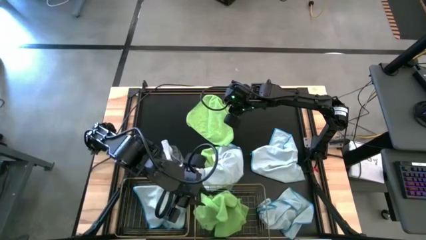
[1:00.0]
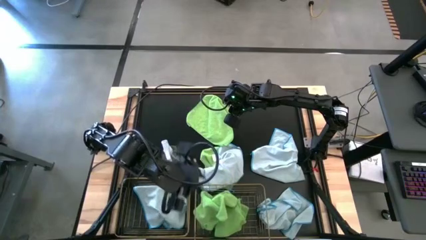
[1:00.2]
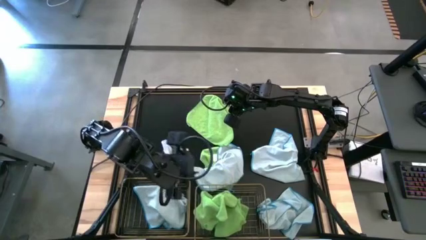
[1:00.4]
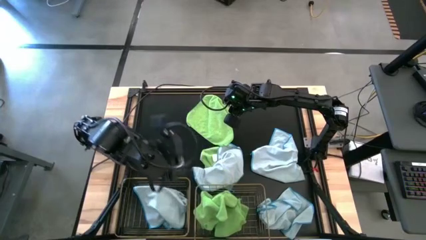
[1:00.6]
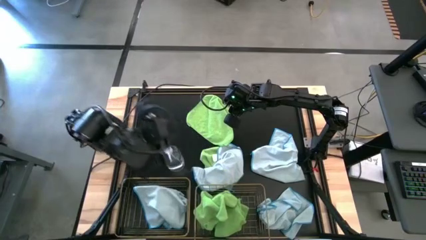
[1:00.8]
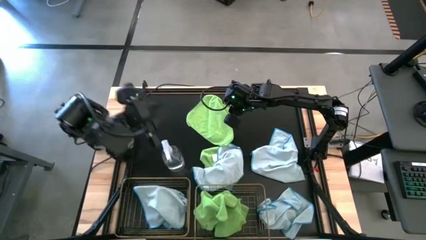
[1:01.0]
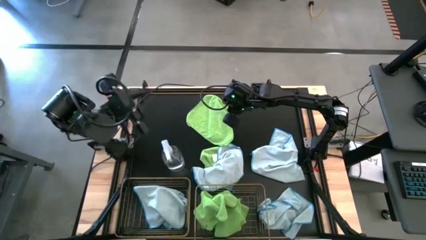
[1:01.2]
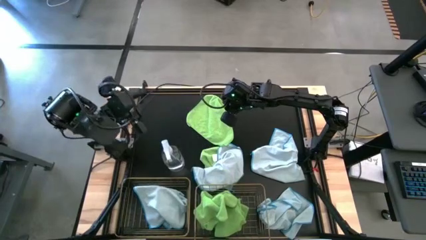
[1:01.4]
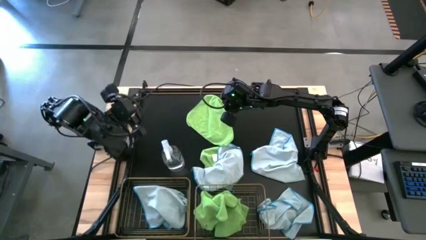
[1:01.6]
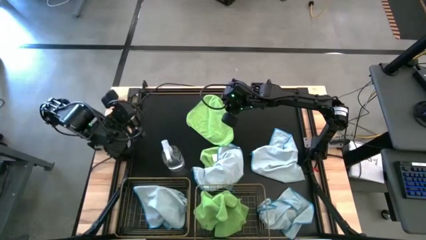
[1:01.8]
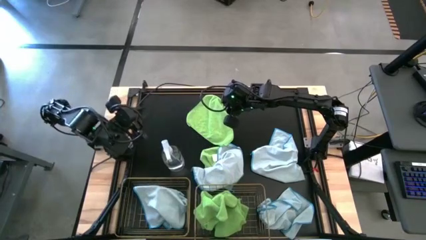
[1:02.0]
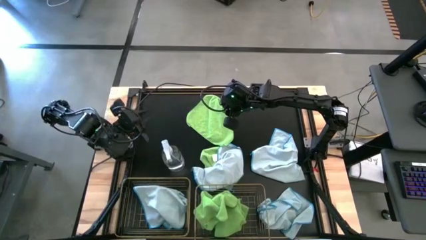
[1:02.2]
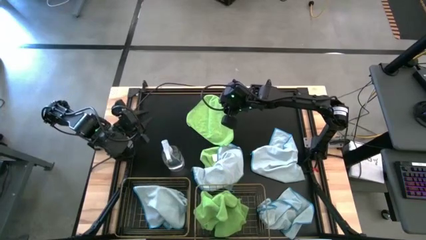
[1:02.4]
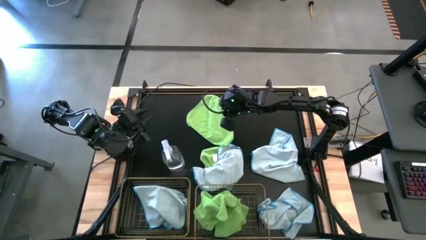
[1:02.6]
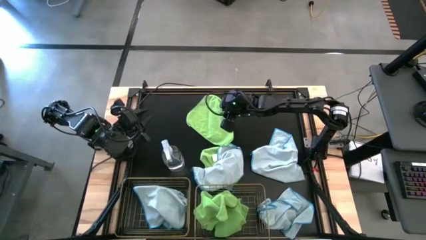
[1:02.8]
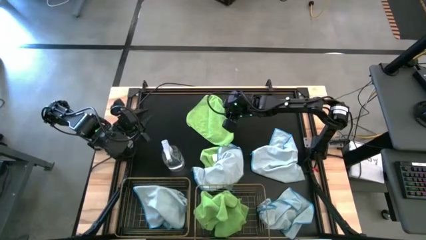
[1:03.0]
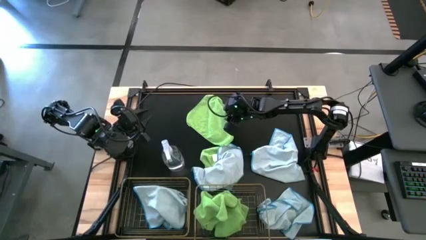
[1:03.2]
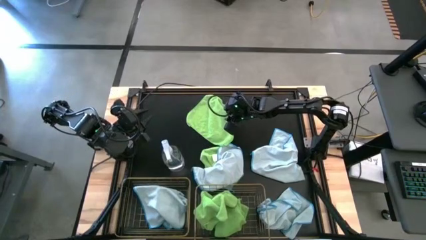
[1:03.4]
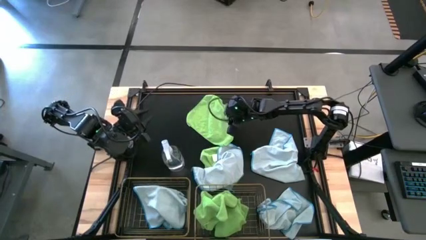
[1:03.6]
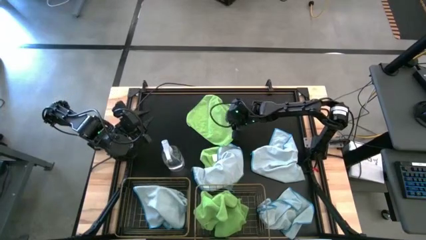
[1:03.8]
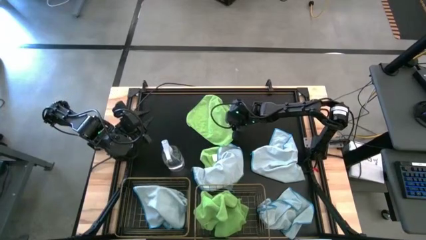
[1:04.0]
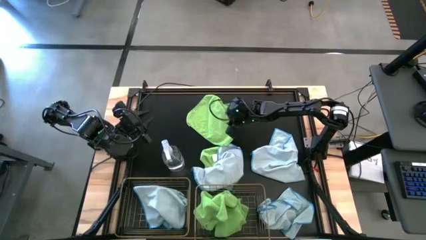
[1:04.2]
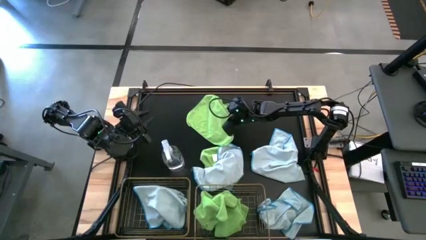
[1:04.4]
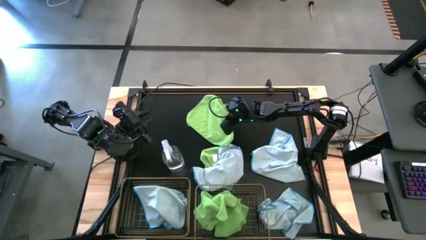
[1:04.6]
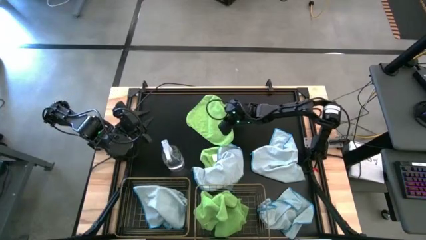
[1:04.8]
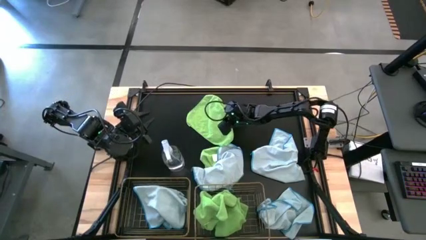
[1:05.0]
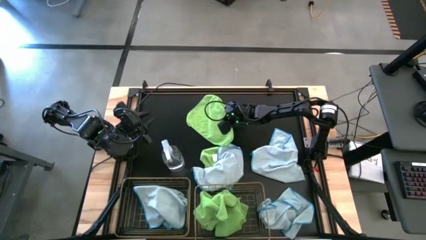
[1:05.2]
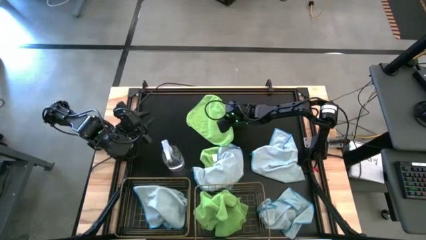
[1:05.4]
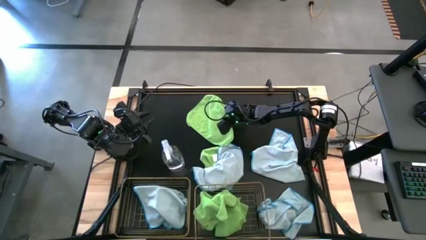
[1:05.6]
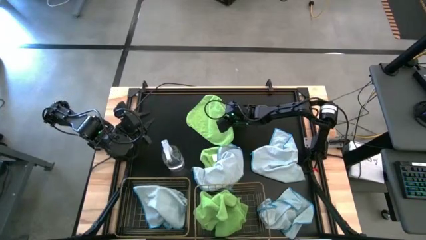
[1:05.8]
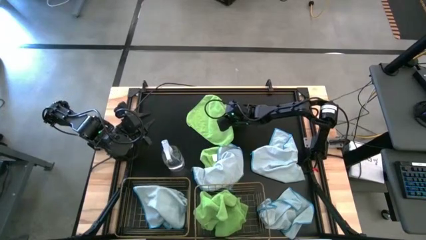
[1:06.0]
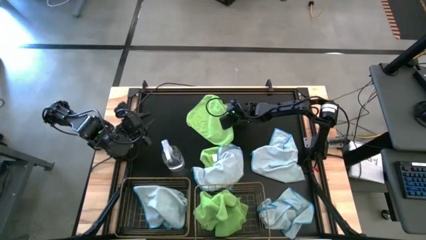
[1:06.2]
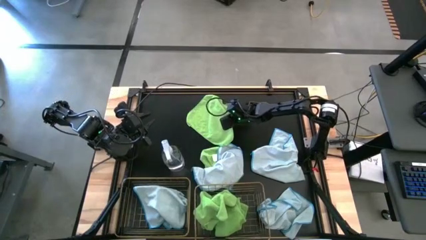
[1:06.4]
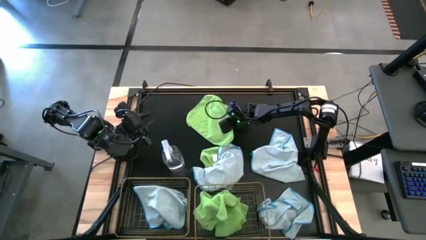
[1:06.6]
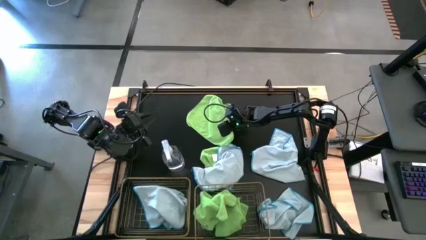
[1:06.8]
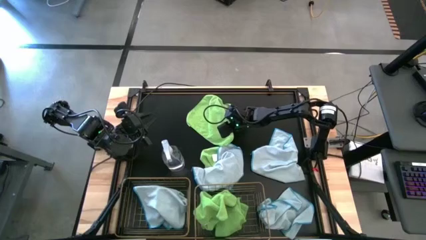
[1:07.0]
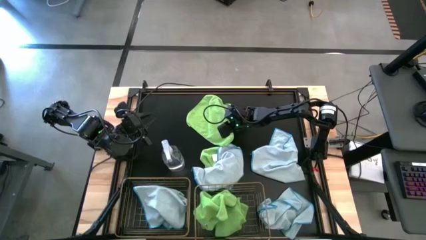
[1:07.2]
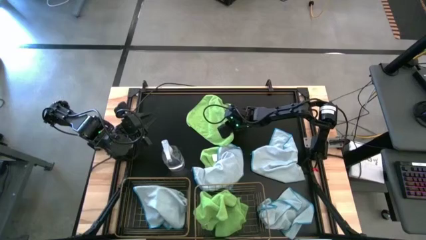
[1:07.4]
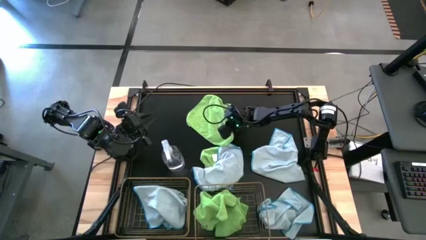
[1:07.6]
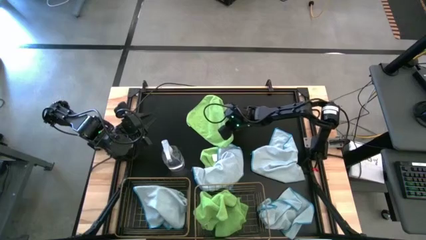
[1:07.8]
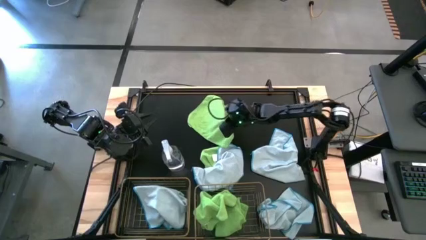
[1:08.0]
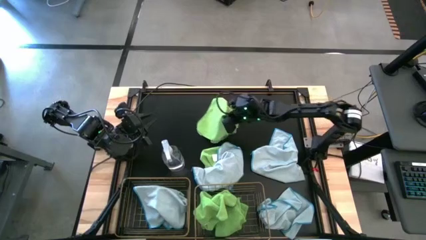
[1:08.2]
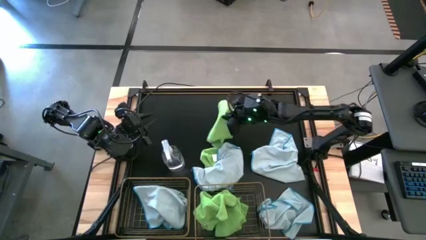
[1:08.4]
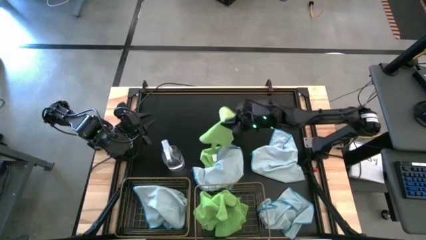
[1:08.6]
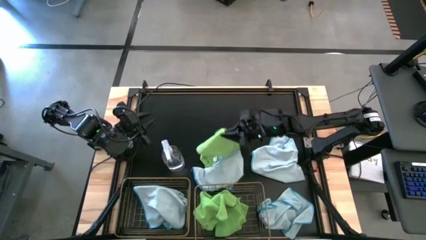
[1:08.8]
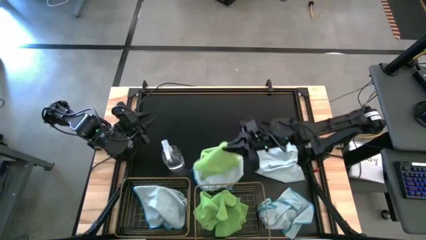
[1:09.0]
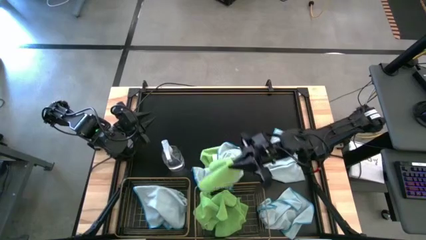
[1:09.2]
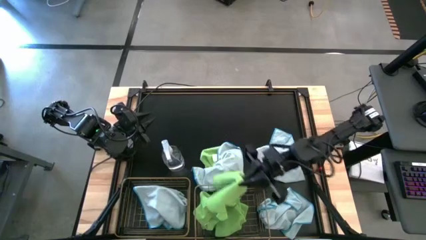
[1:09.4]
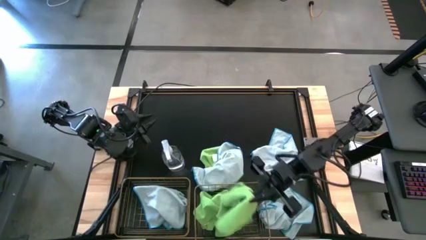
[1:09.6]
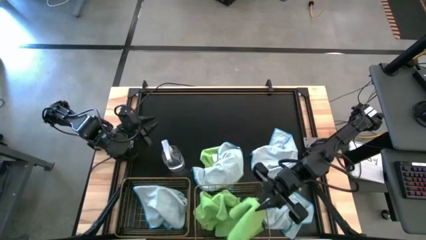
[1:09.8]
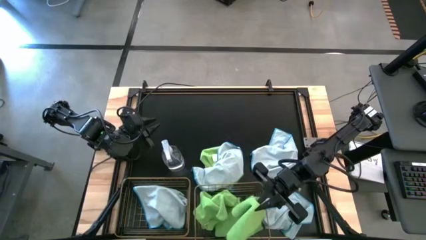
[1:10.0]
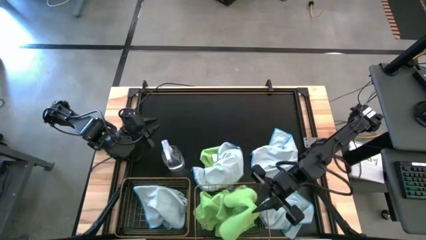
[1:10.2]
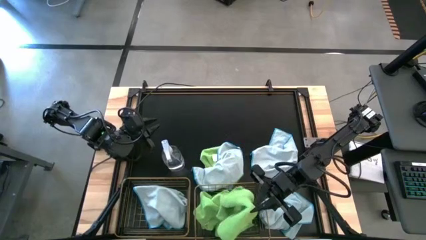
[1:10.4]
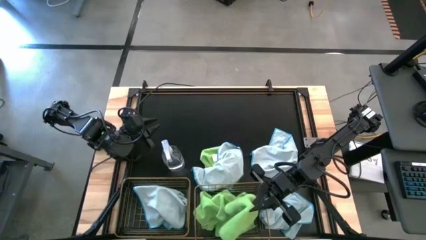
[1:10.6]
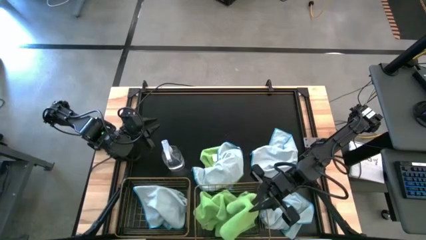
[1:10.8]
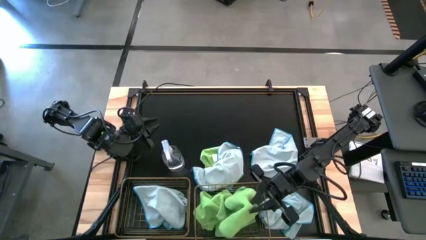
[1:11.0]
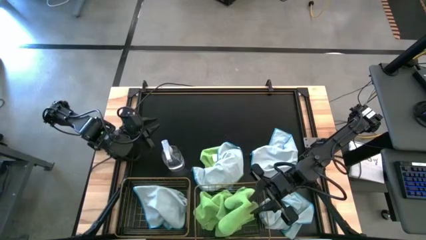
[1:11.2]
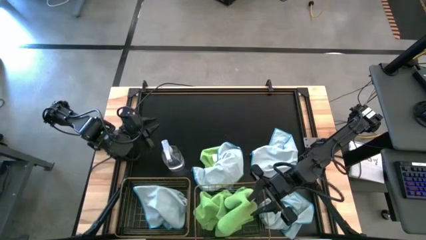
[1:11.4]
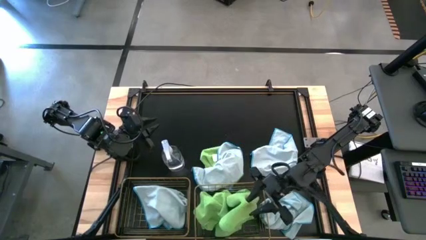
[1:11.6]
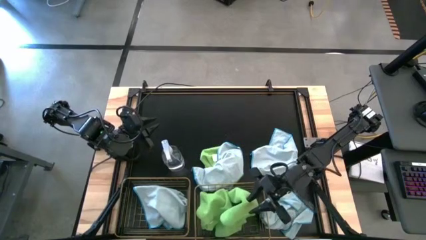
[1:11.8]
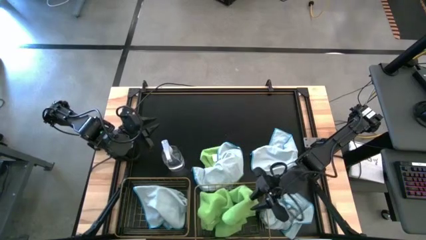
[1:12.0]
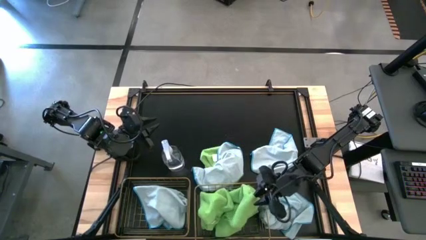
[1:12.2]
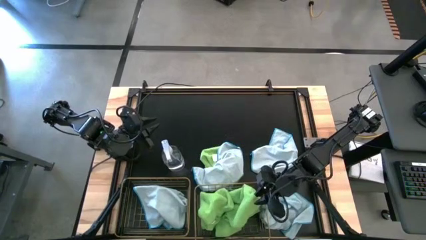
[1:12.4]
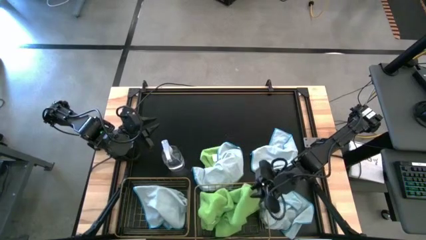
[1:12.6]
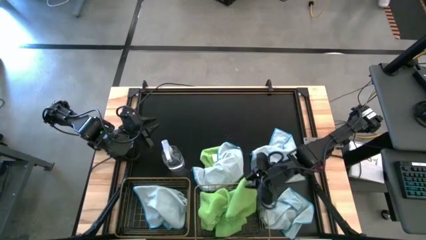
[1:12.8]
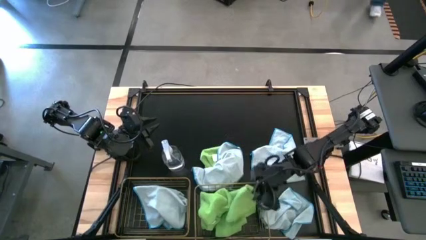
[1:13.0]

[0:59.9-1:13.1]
Task: Sort microfiber towel by color & place in baskets
Put the green microfiber cloth into the right wire basket
